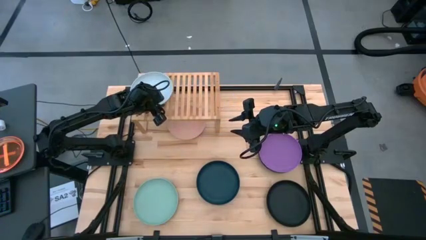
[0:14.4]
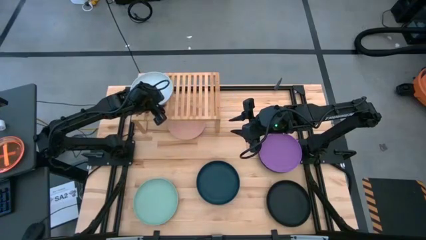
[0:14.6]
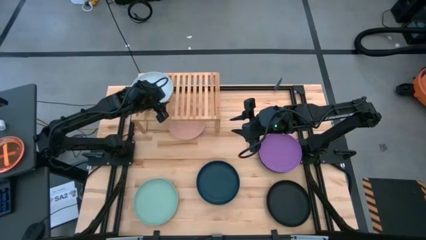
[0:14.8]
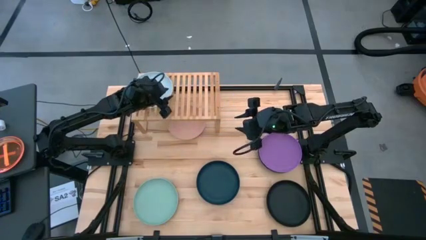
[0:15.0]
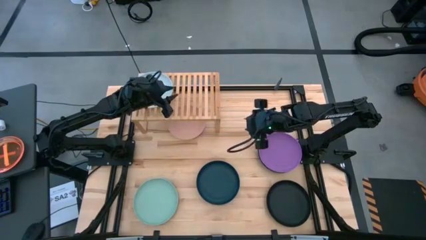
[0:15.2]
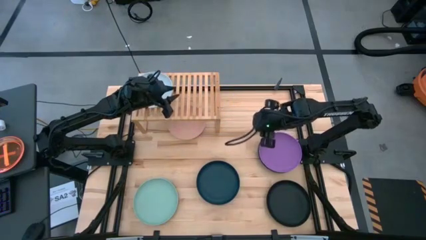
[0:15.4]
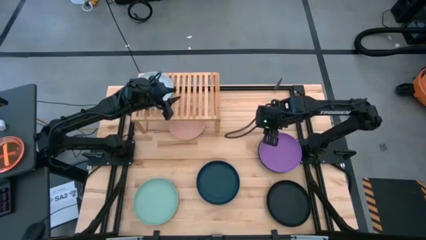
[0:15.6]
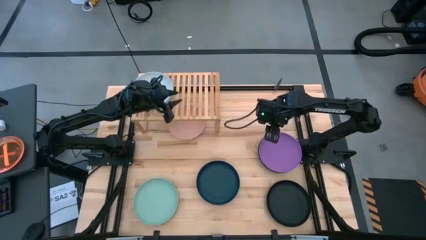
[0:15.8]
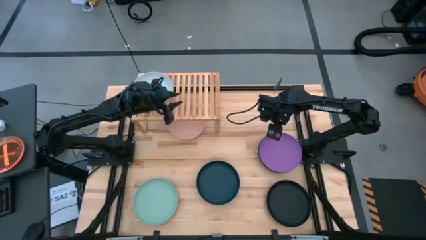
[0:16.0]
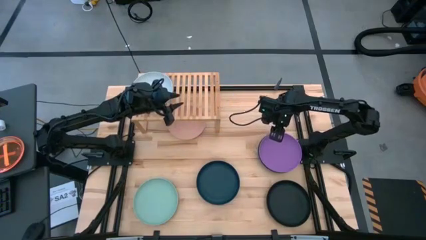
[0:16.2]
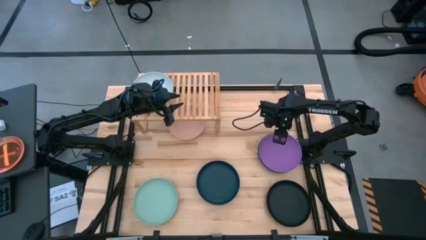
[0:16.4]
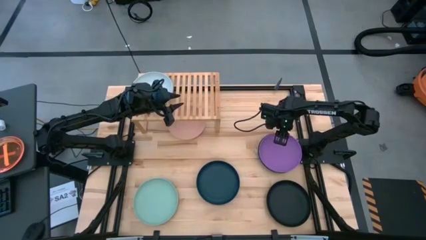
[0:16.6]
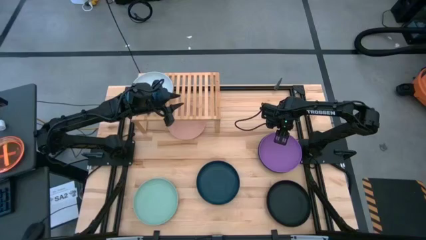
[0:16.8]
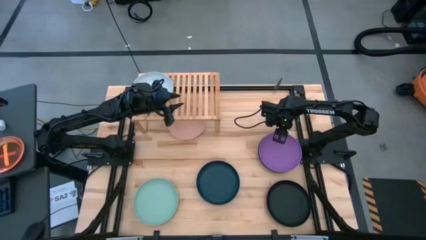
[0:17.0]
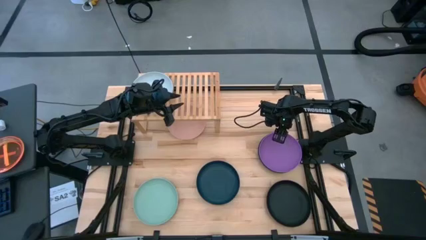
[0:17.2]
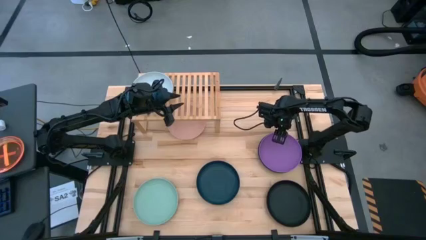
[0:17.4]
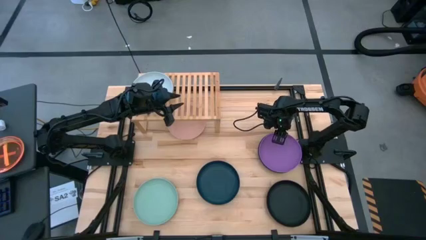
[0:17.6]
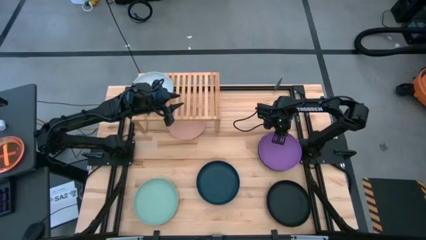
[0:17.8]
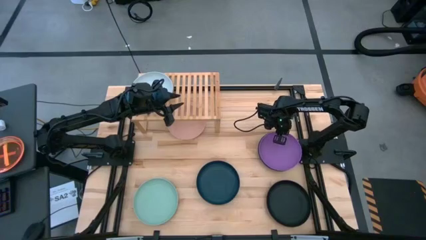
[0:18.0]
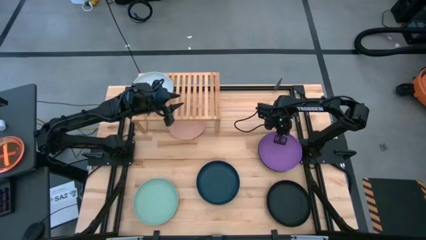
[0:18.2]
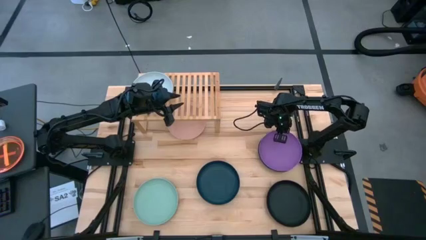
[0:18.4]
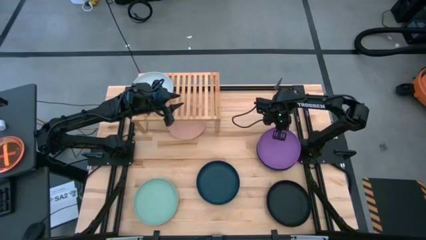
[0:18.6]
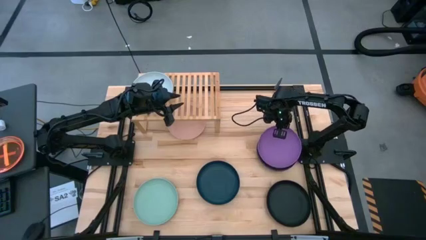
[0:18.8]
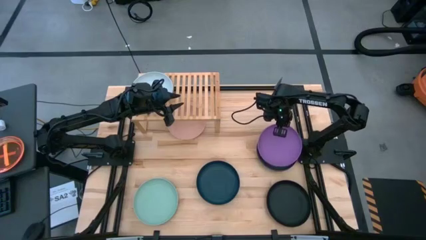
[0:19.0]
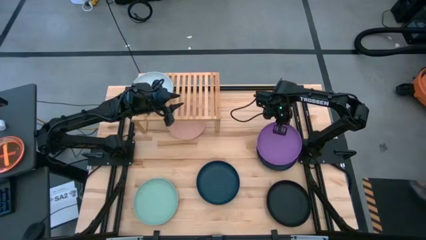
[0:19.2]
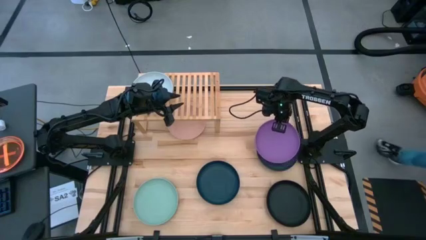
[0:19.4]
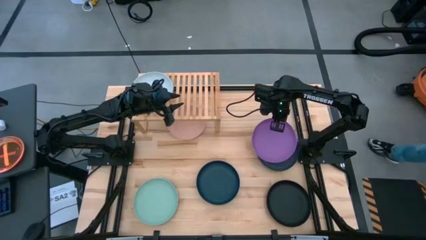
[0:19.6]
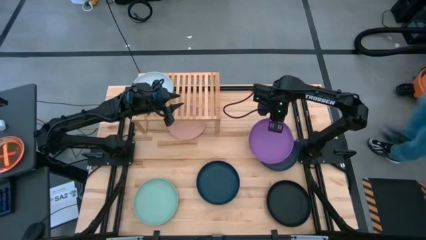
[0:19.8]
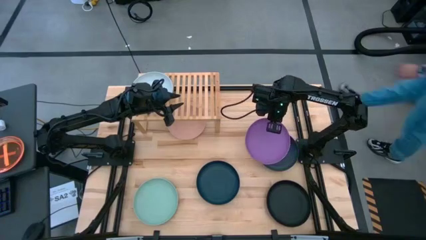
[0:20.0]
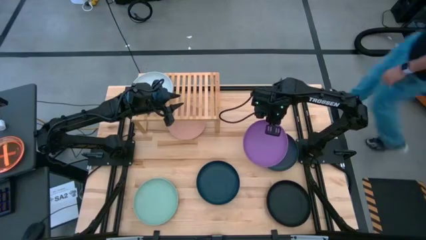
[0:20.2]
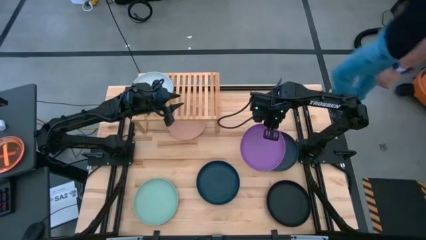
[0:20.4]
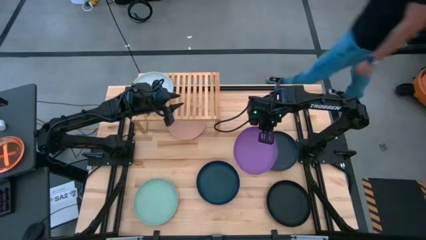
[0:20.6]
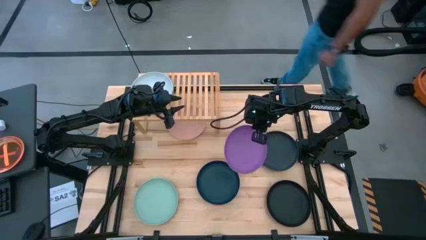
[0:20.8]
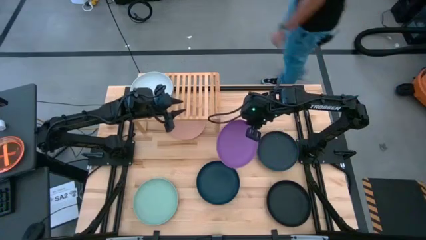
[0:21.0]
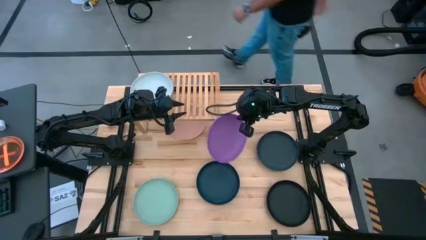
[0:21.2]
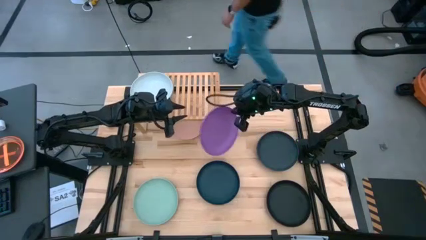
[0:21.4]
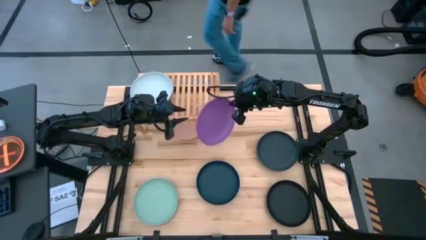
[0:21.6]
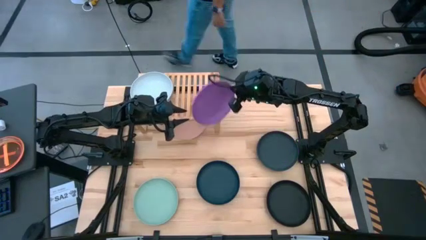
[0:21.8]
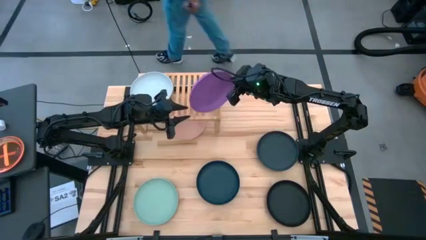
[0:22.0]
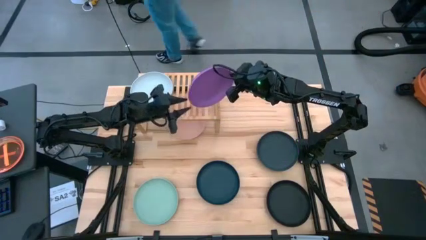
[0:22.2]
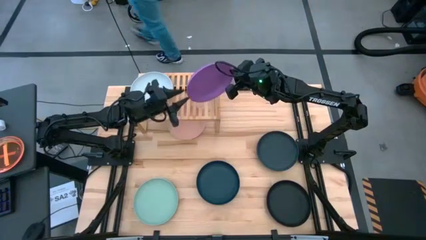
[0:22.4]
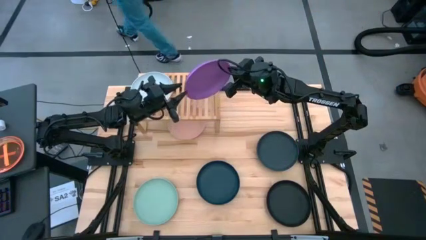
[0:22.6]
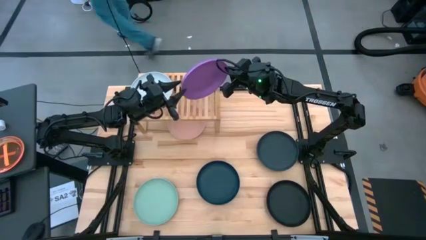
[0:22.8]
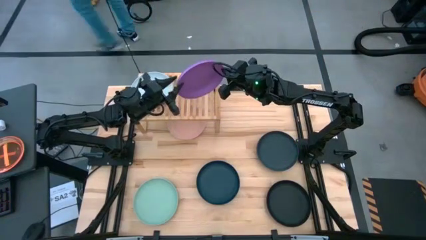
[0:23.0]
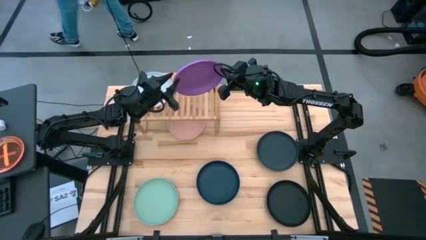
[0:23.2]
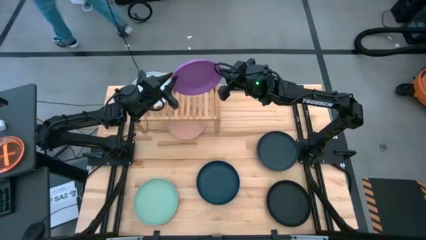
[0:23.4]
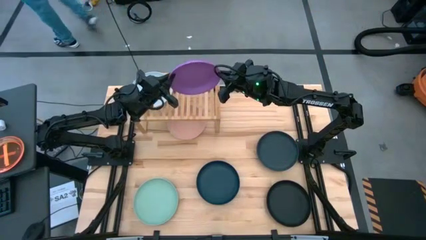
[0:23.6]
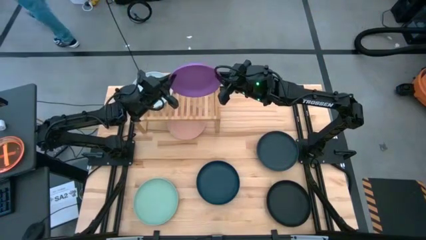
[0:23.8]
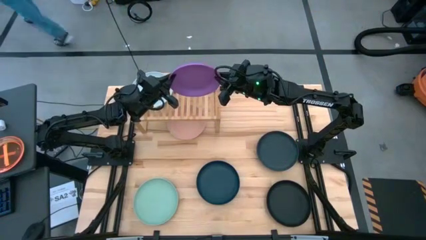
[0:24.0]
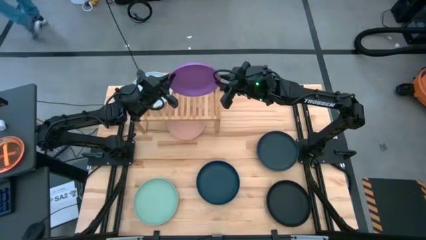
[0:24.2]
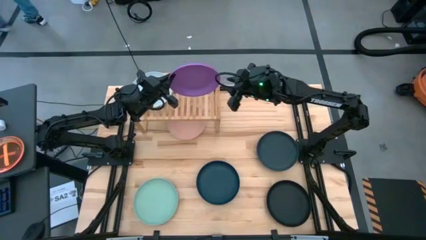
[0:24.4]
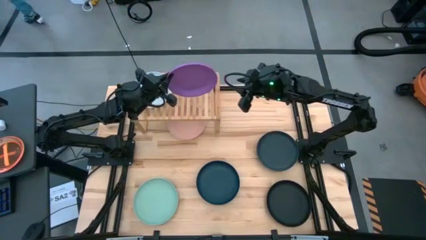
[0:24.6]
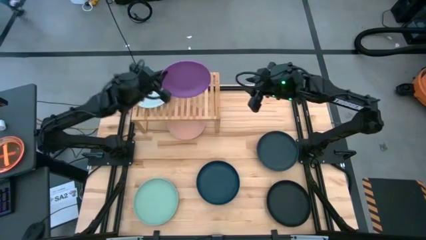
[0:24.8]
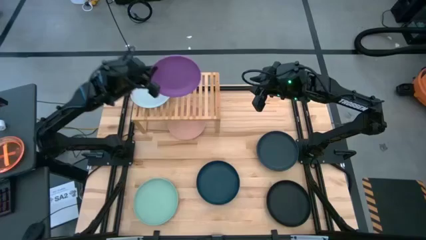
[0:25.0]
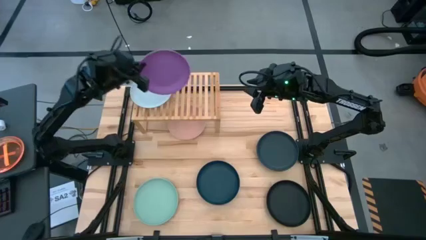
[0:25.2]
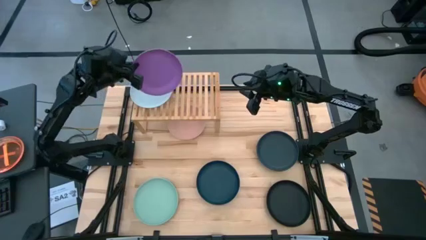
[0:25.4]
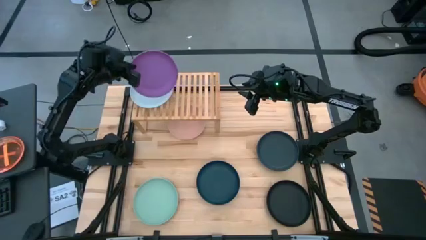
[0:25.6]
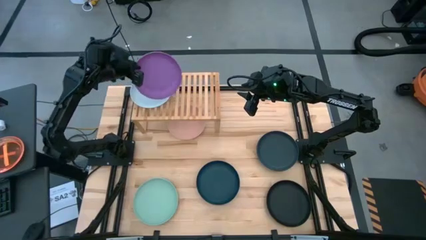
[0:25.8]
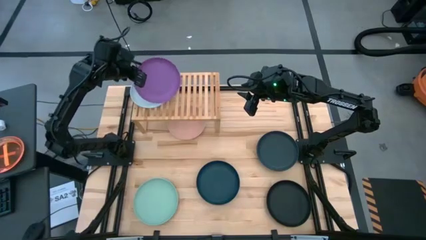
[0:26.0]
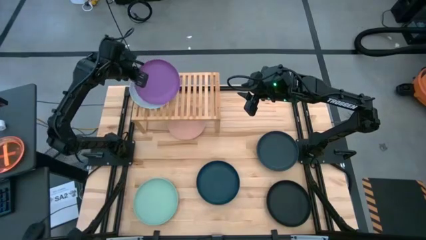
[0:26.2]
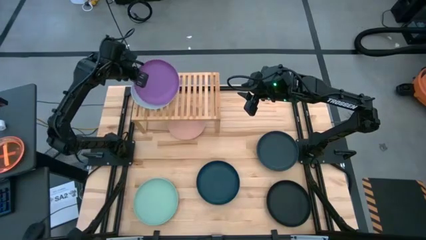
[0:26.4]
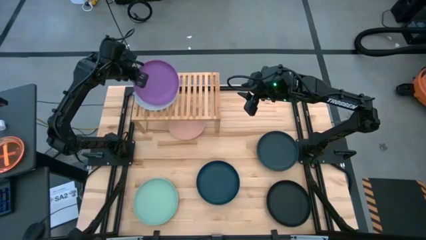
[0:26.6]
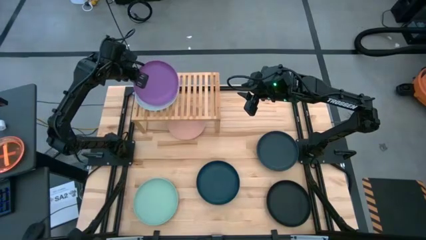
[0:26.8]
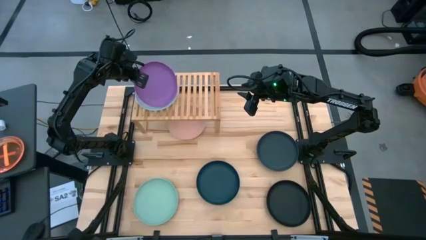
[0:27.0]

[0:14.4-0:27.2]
Task: Place and stack plates onto a shelf
Stack the violet plate on the top of the white plate on the shelf

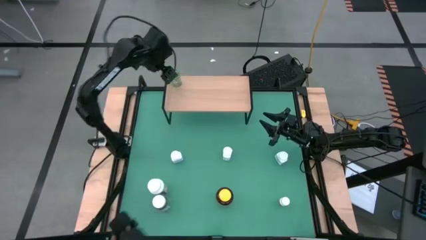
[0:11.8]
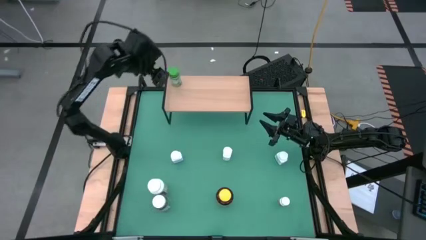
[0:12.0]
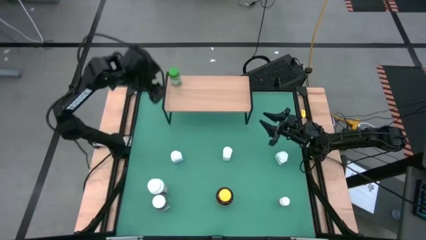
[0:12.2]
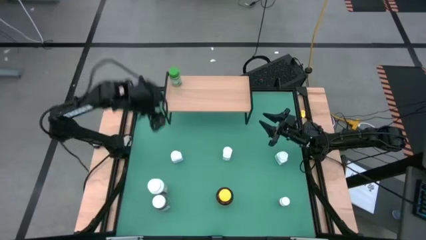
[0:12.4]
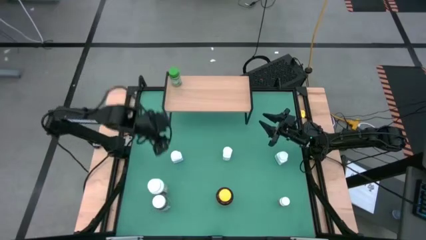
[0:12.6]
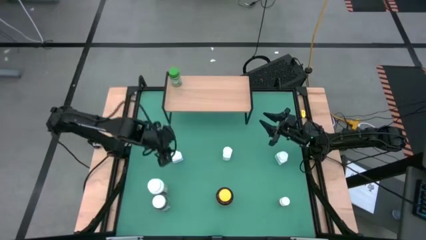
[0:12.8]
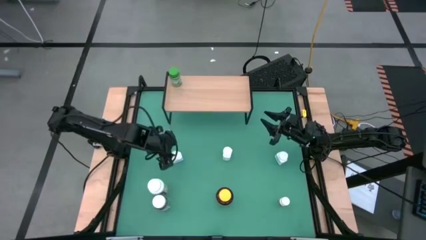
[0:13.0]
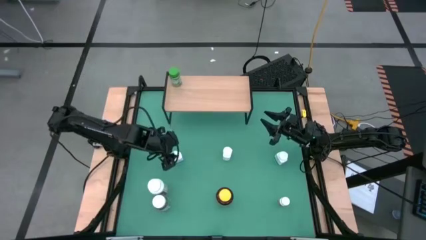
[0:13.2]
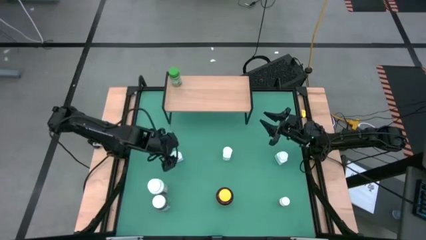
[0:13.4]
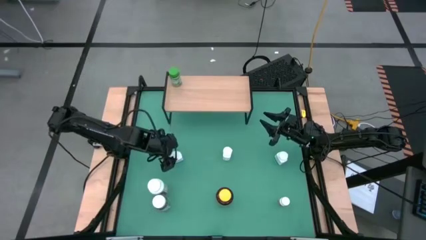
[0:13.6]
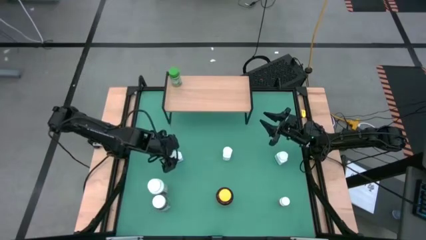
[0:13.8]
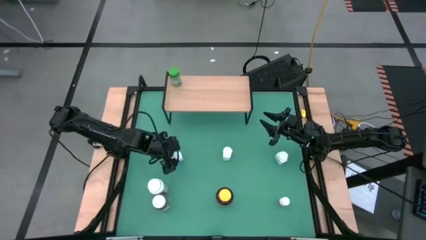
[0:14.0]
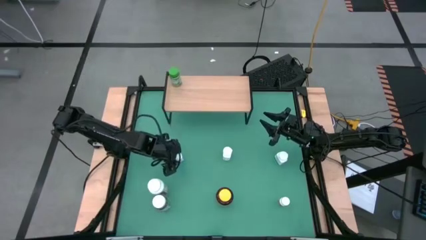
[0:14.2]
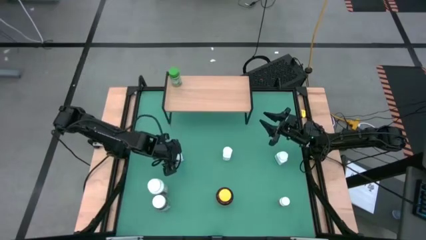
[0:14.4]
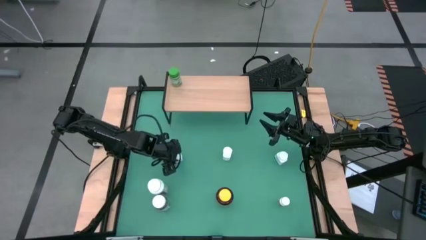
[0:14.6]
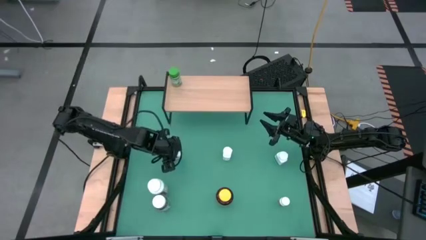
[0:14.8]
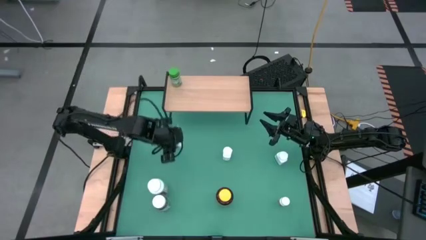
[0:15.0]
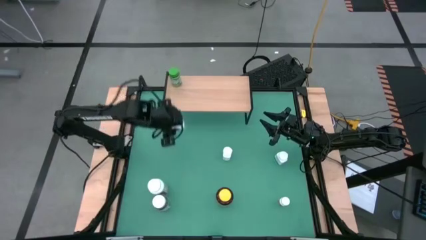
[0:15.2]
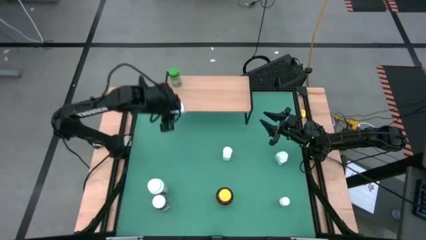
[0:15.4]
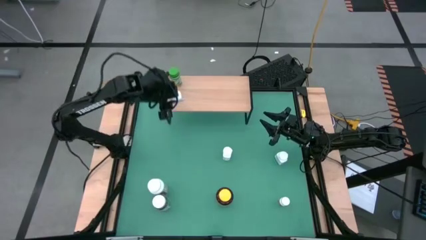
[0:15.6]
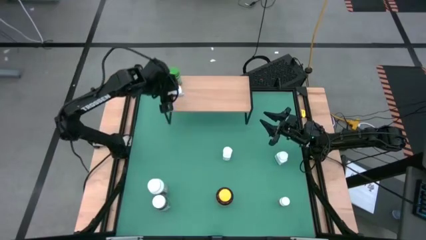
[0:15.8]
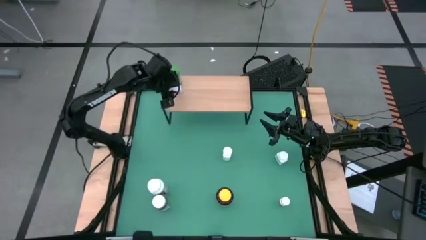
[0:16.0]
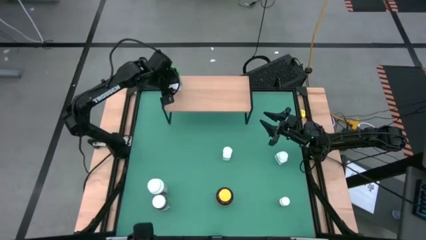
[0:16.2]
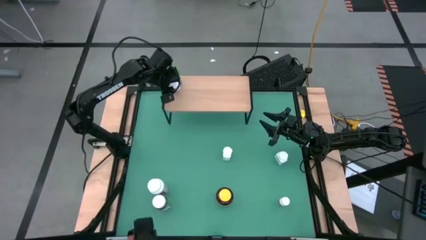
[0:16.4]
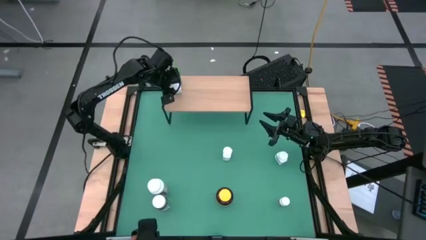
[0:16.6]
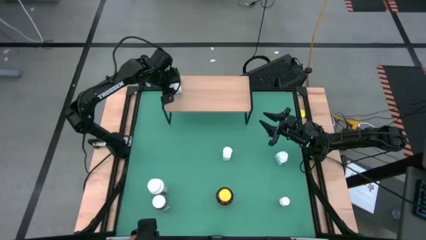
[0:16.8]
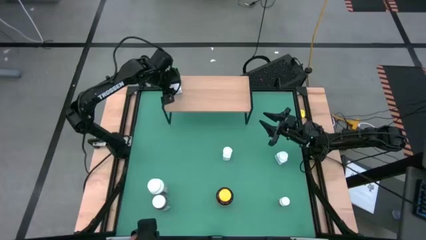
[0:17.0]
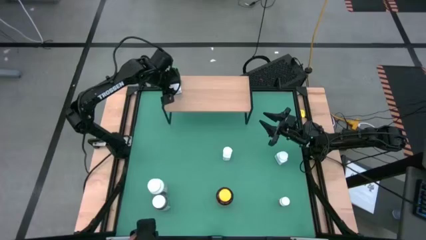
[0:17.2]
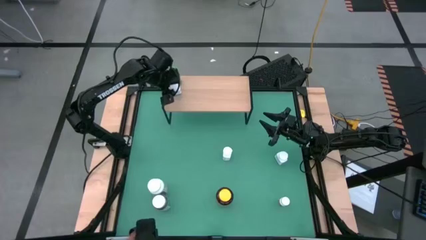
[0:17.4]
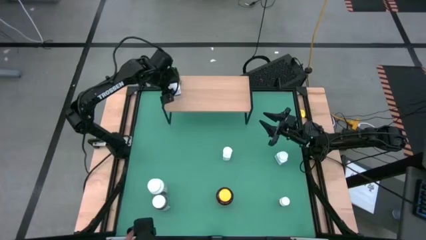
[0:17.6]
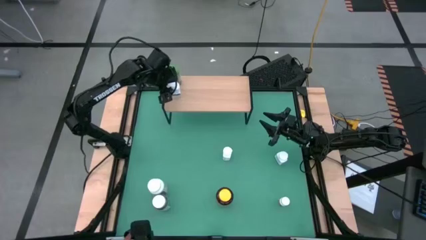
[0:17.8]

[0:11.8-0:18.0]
Task: Pick and place medicine bottles onto shelf by color
Put the top left white supplement bottle on the shelf
